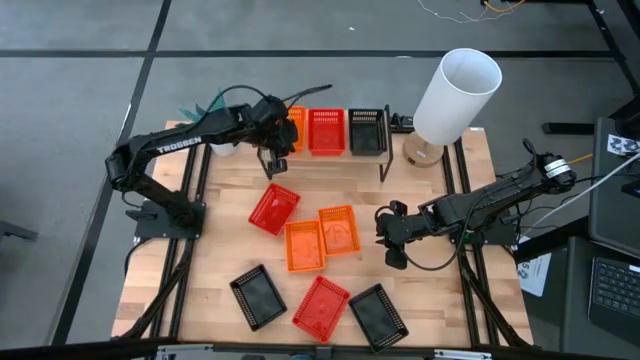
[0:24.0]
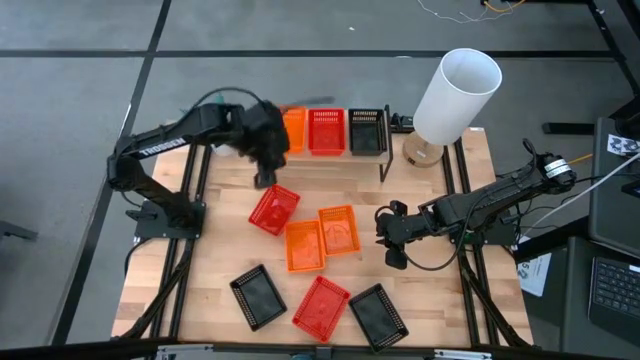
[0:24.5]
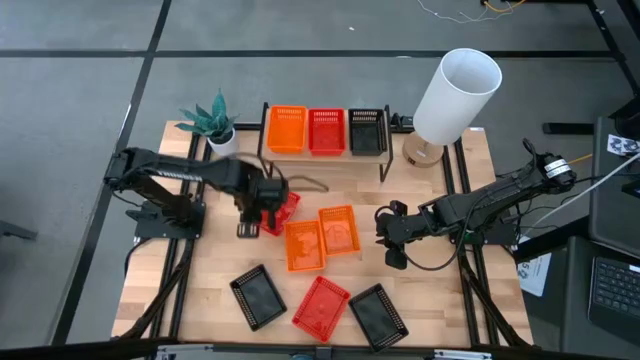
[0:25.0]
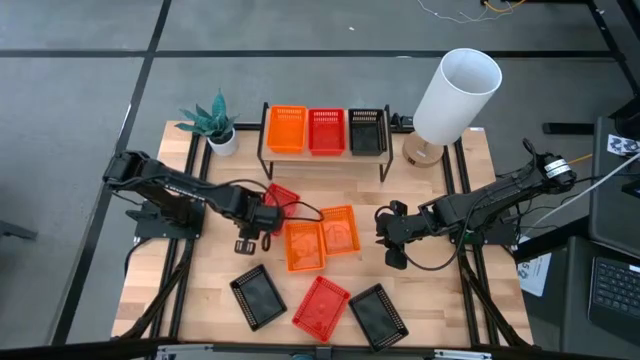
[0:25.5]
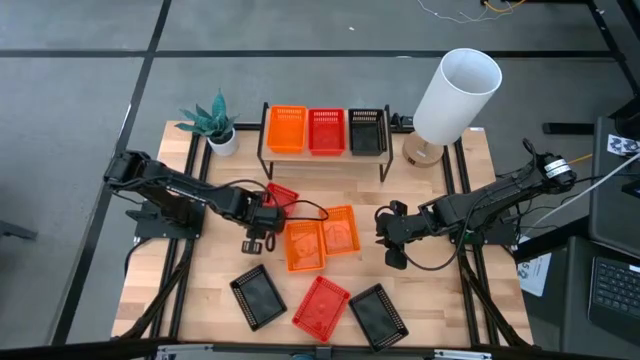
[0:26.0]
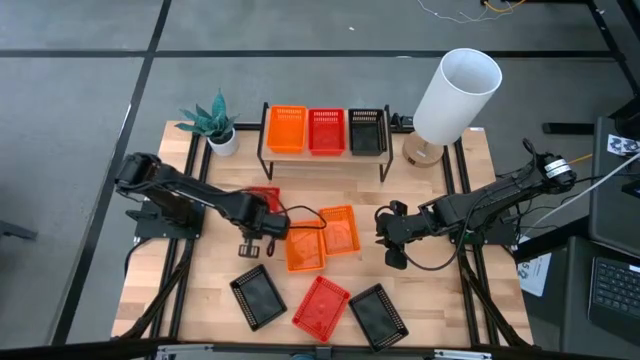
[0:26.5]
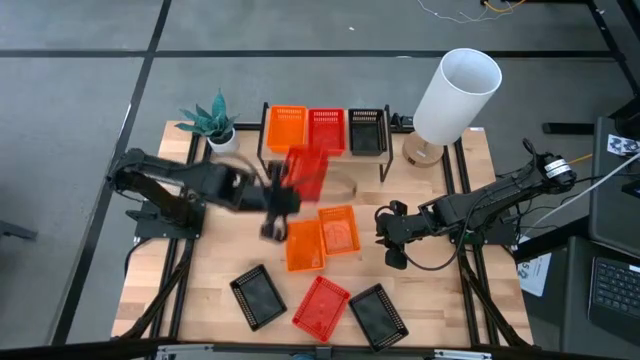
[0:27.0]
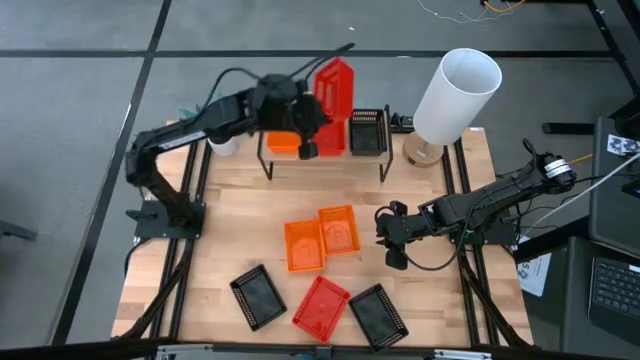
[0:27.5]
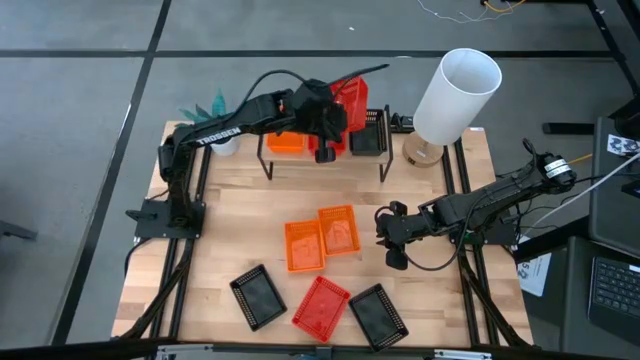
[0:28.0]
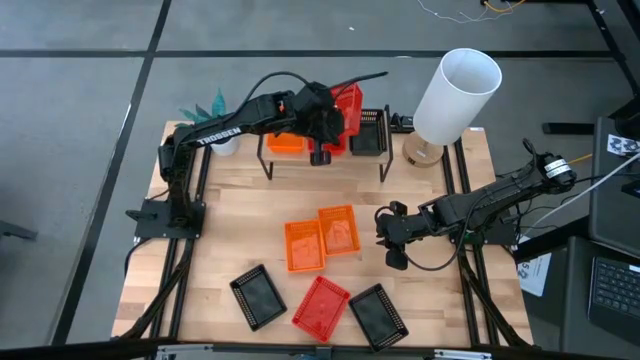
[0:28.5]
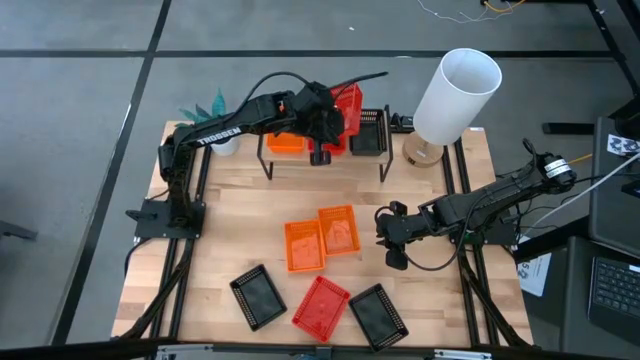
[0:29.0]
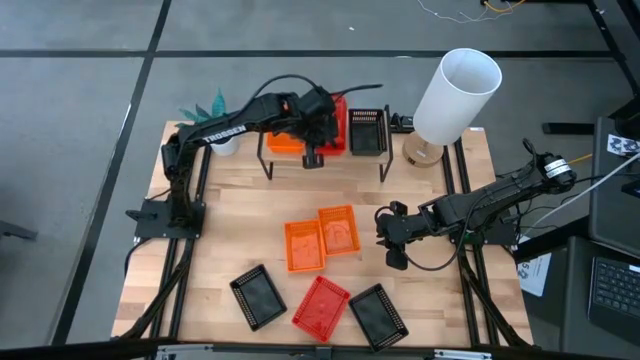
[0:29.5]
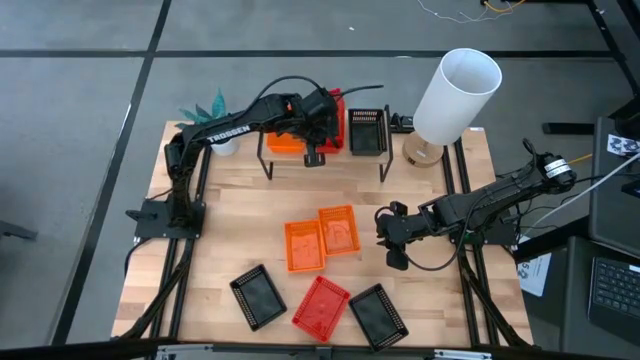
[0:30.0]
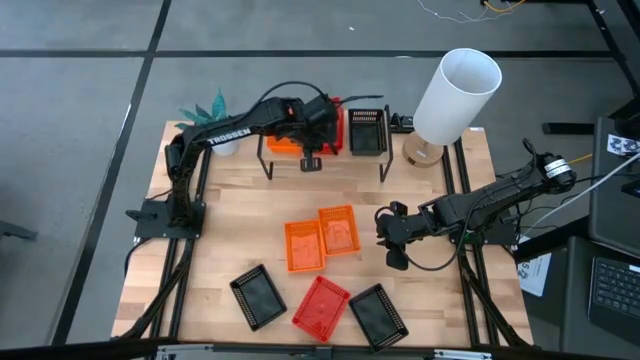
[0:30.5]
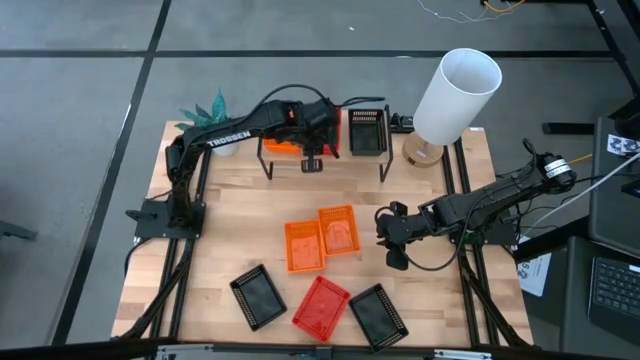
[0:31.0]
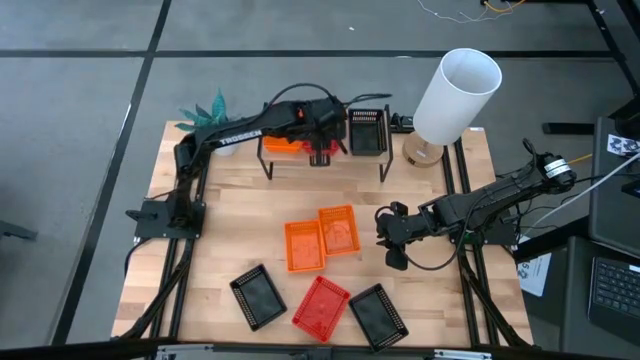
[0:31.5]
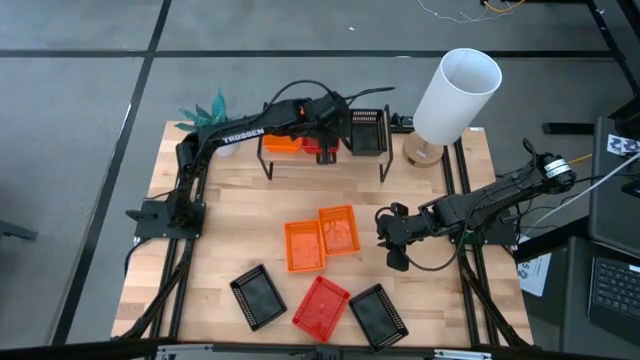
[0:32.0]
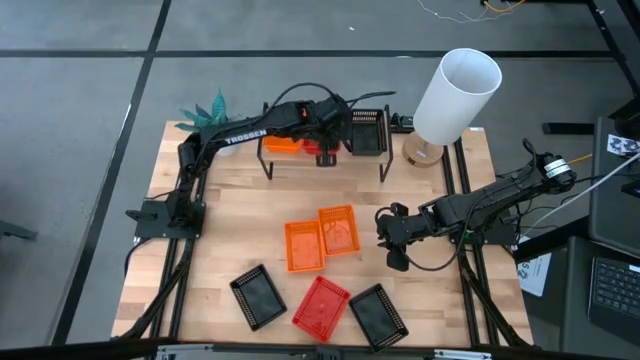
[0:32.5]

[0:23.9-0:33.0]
Task: Stack baskets on shelf by color
Stack the top red bin on the red bin on the shelf

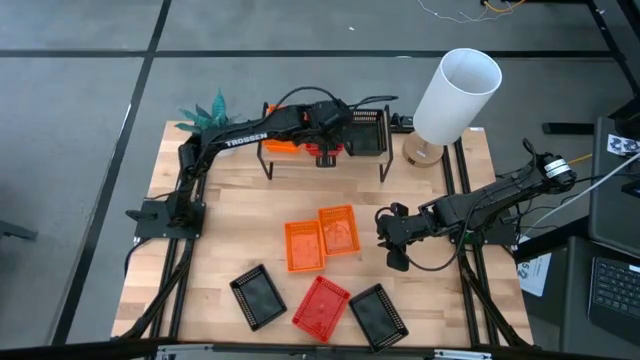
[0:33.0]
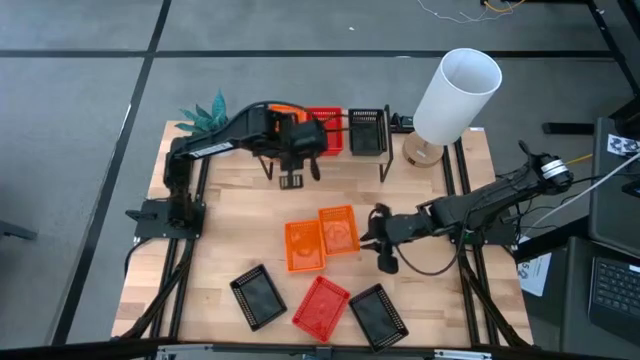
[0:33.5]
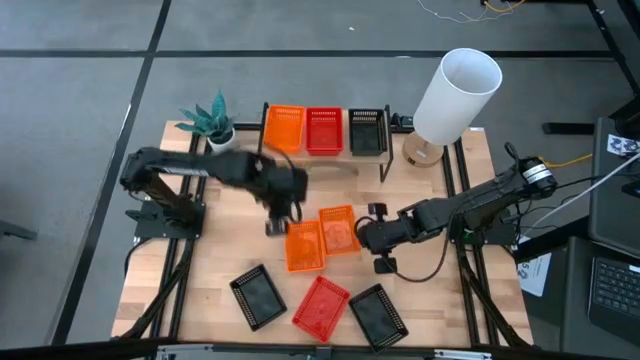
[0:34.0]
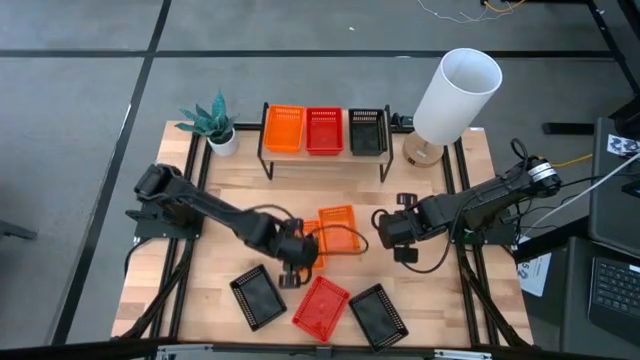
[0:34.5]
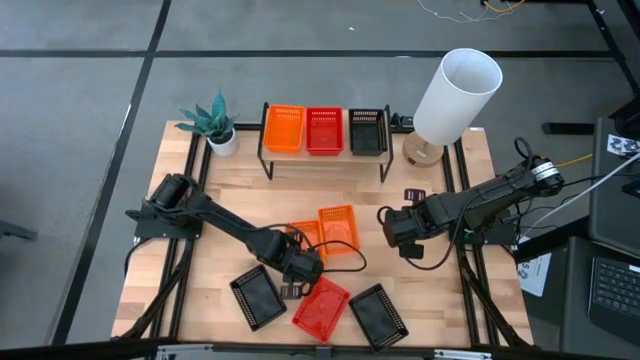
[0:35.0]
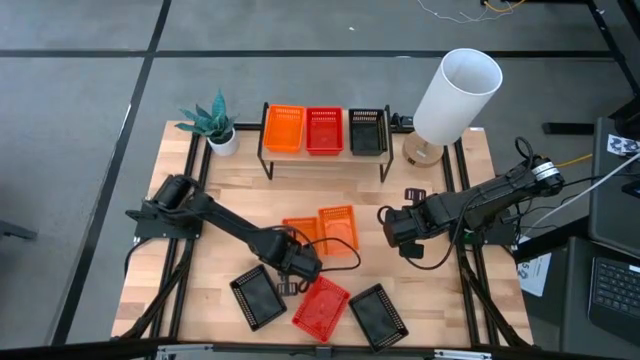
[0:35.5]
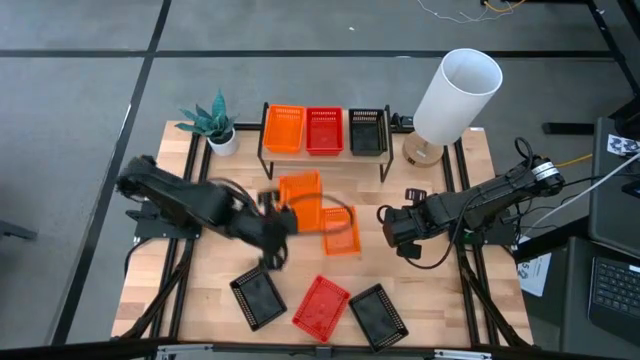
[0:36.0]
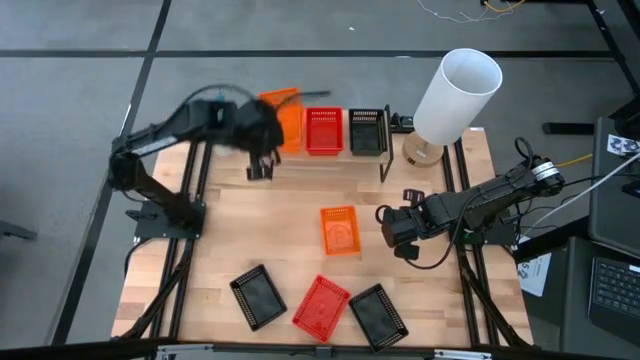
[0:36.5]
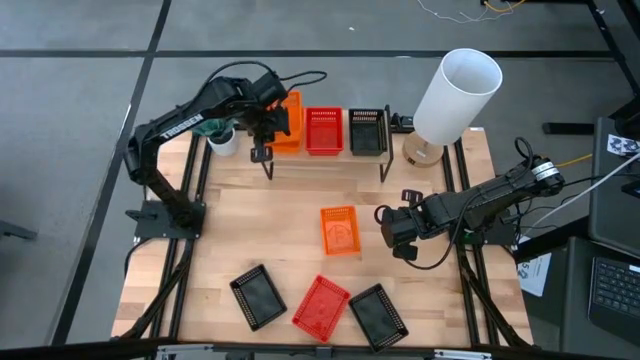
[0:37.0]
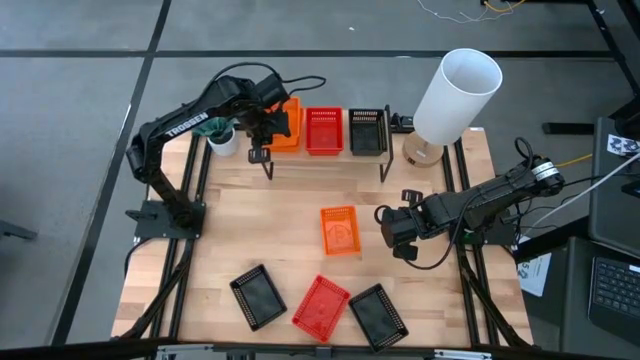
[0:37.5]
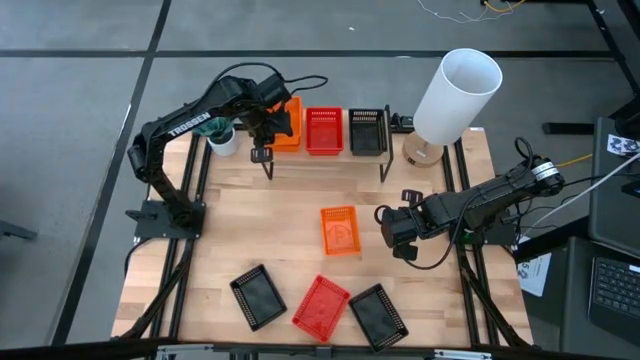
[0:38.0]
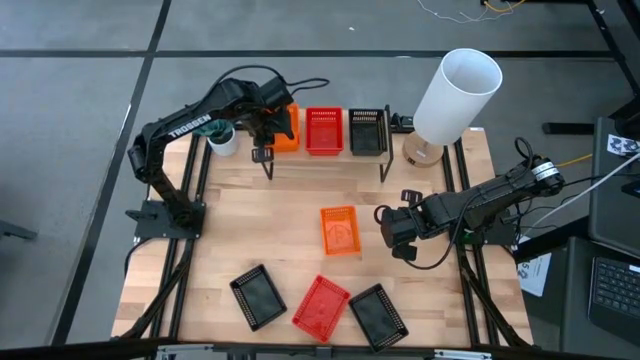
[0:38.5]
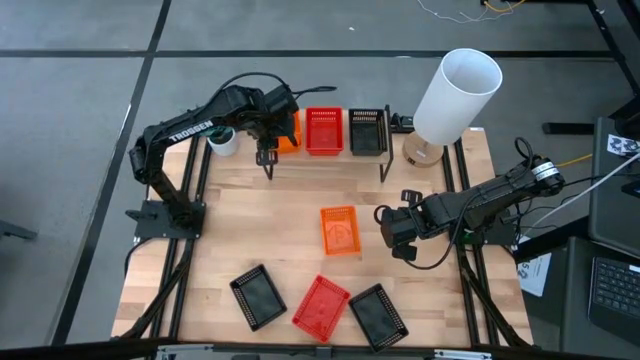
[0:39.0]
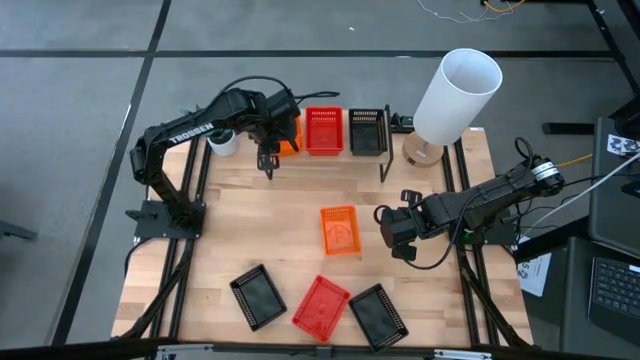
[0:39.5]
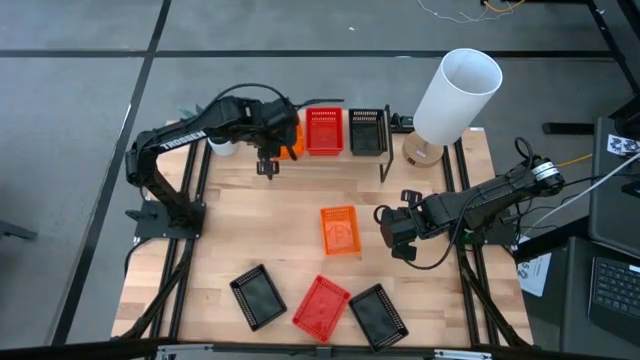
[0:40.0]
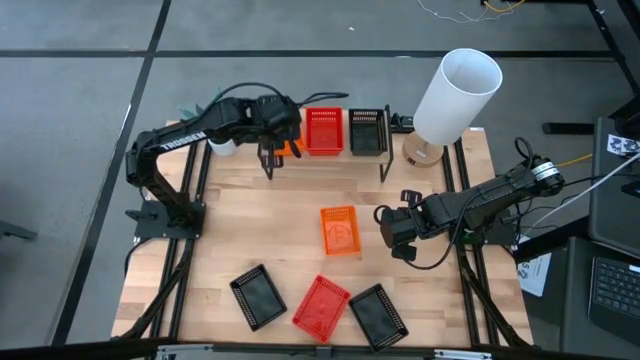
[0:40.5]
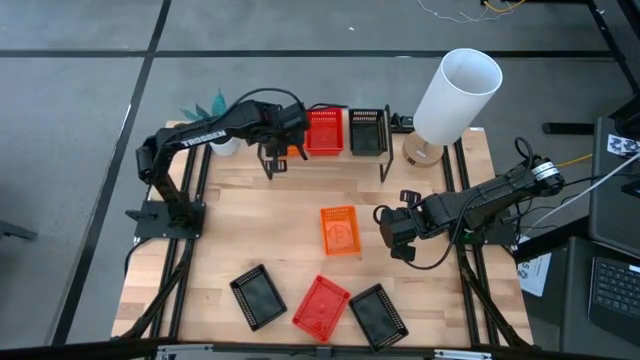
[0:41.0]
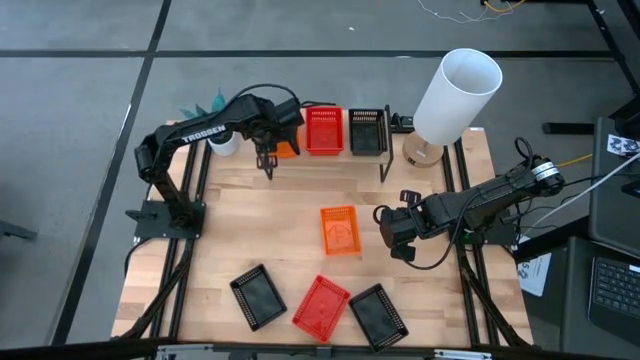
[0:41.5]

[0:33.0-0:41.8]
Stack the left orange bin on the orange bin on the shelf

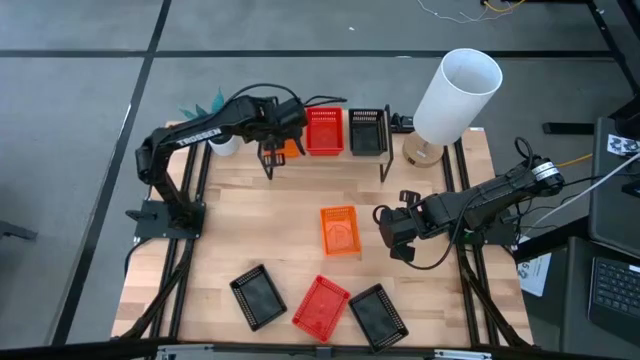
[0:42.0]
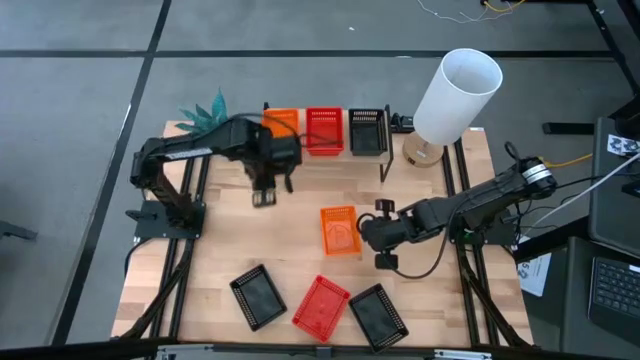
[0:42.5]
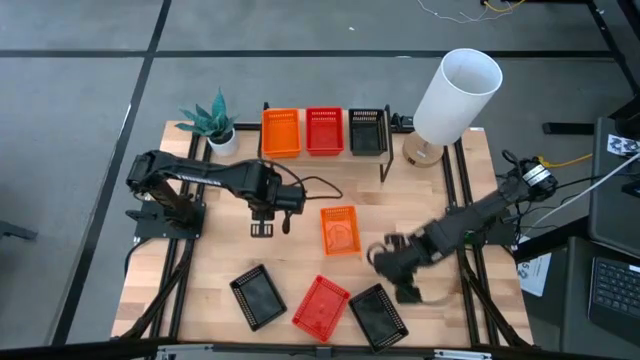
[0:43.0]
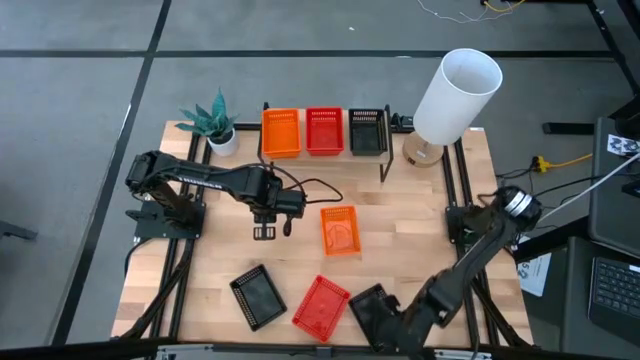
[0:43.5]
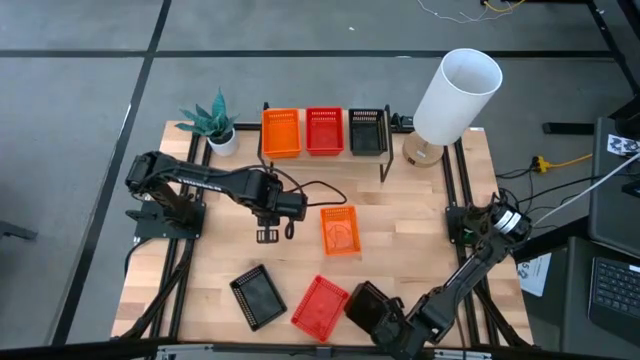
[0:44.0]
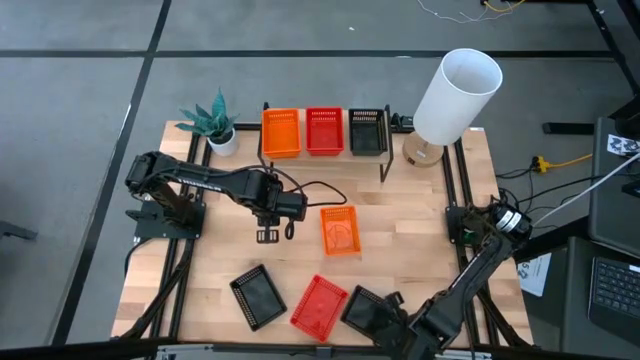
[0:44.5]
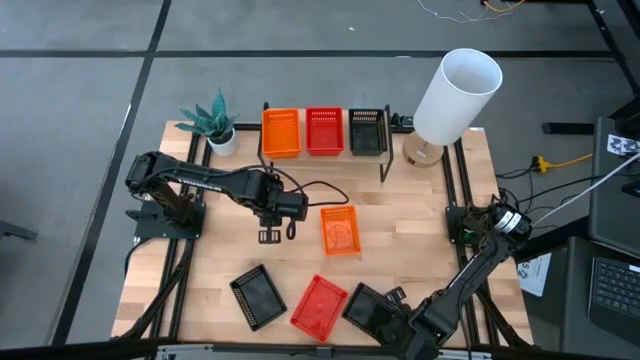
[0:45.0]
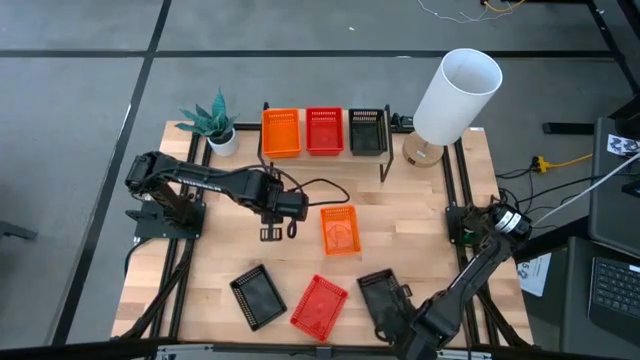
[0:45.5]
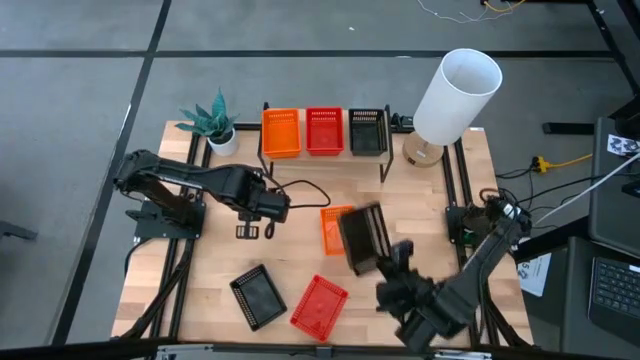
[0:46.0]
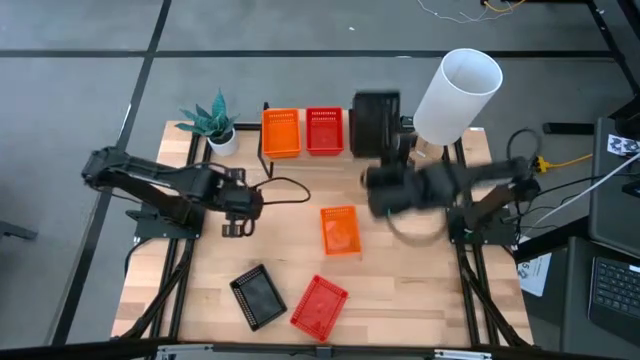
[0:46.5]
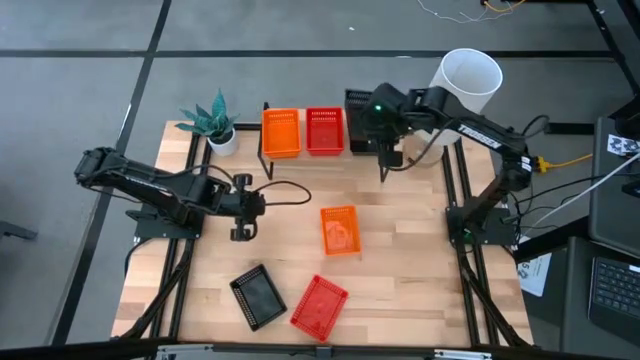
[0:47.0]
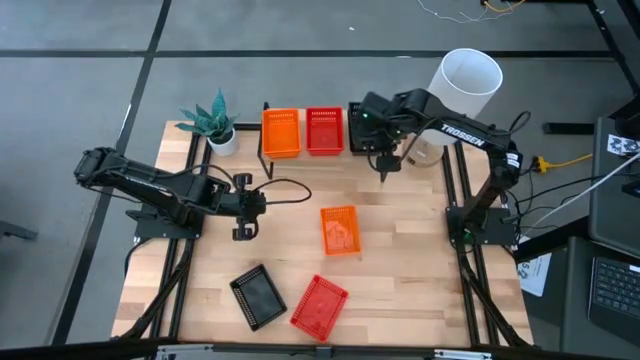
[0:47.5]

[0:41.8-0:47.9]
Stack the right black bin on the black bin on the shelf
